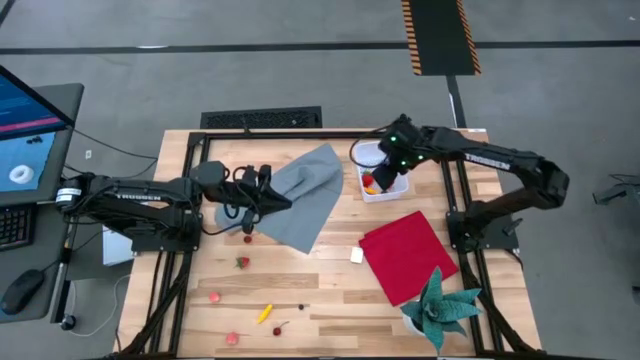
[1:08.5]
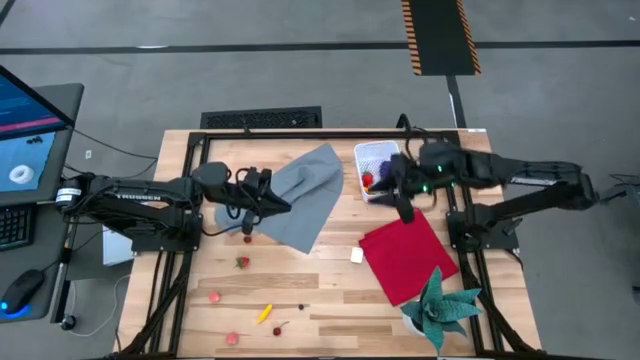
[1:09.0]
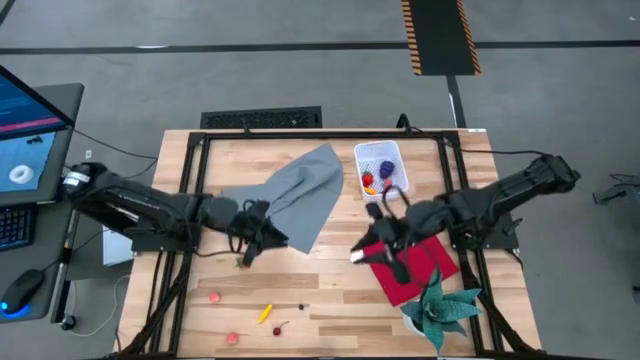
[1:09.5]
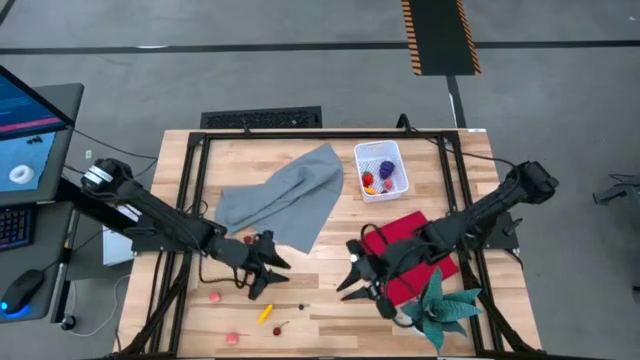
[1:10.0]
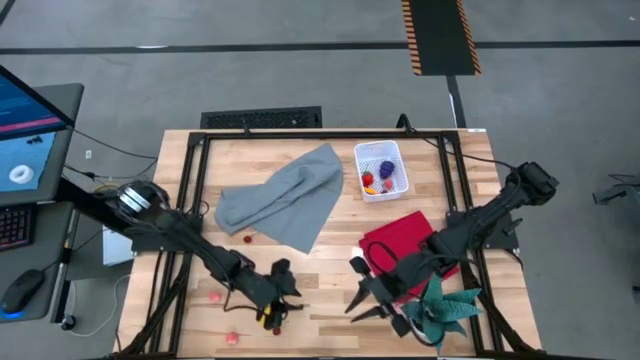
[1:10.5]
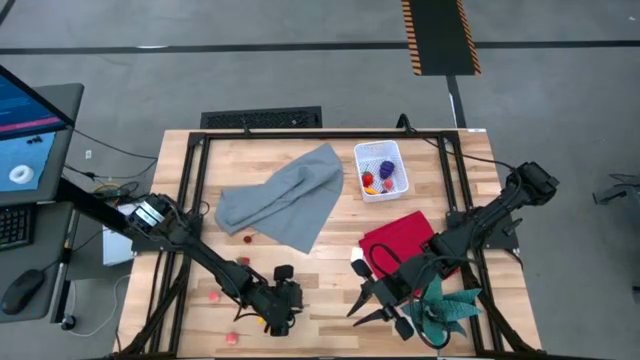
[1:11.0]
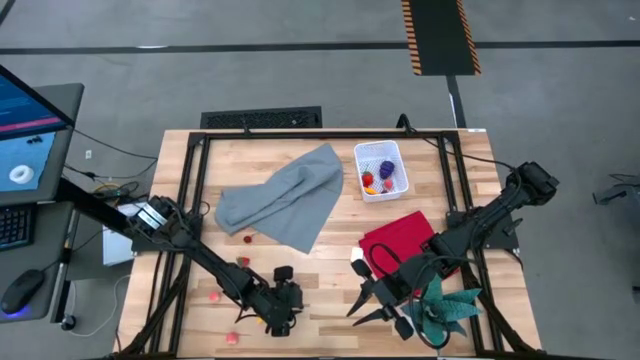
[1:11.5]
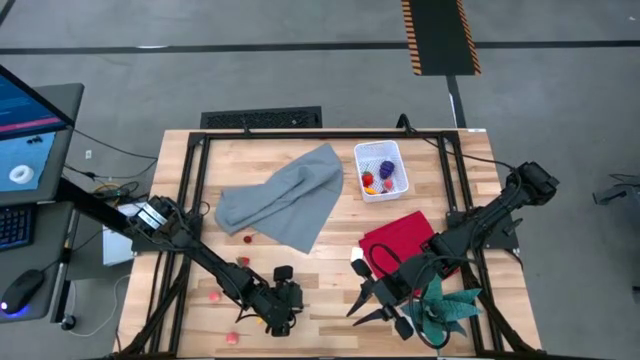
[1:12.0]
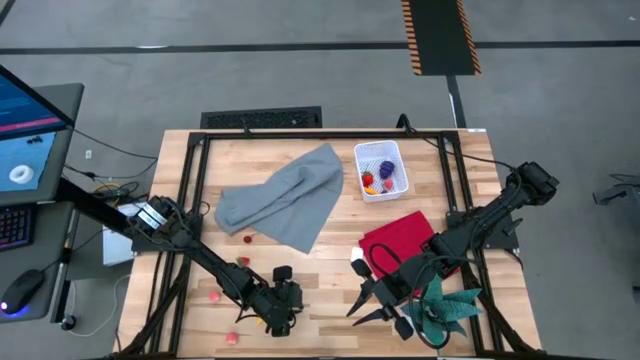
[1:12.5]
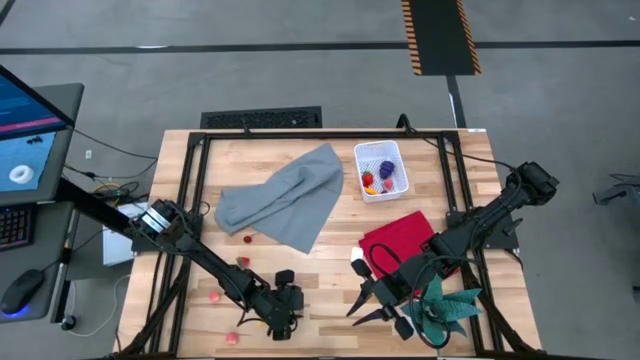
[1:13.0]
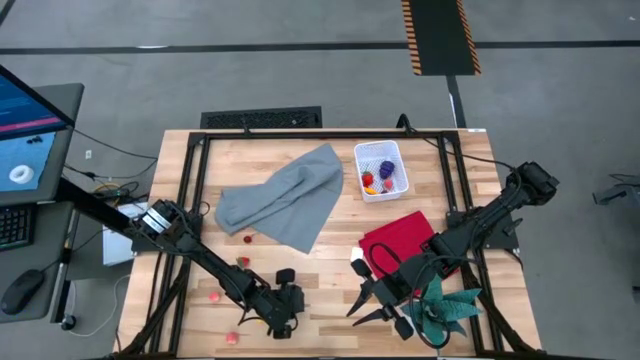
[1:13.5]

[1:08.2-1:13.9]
Task: Pick and placing Produce into tupperware
Put the blueberry into the white bin

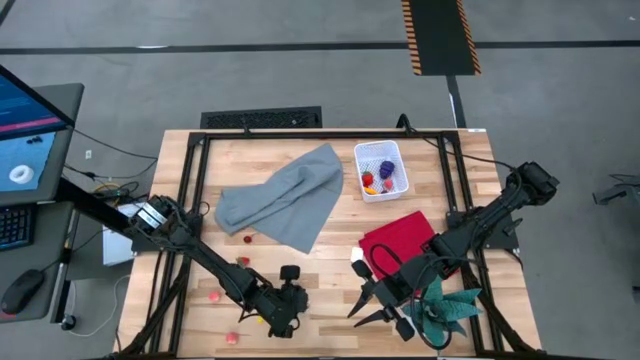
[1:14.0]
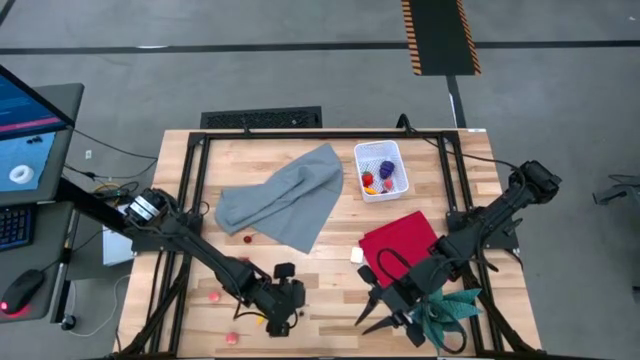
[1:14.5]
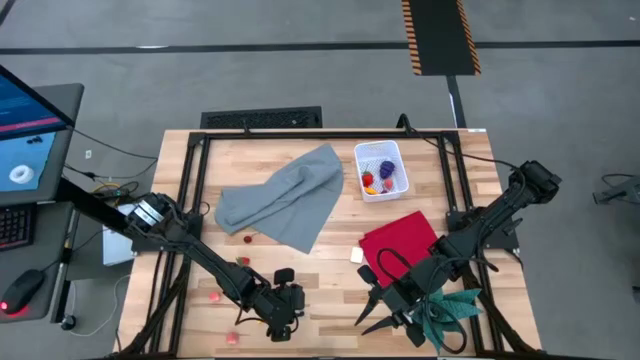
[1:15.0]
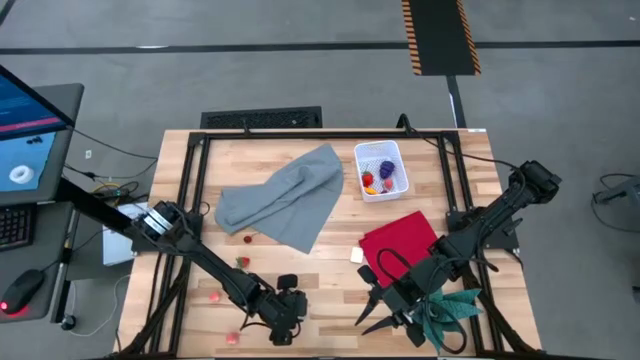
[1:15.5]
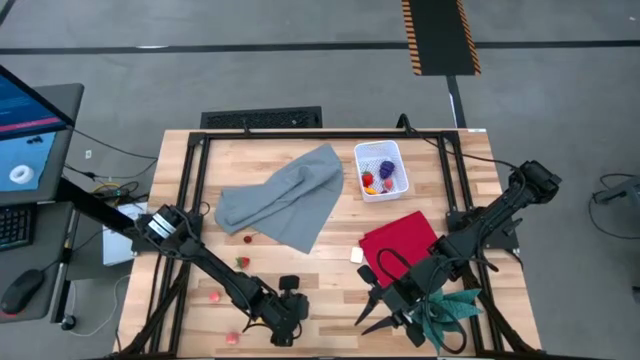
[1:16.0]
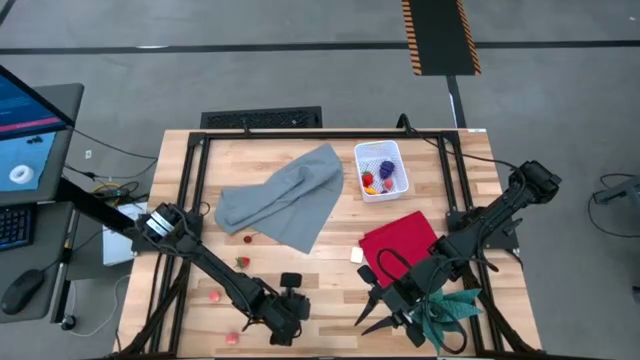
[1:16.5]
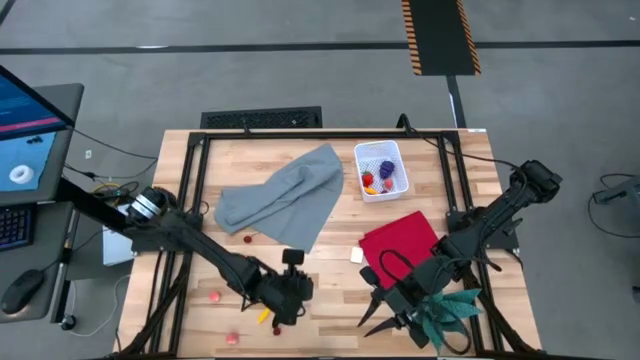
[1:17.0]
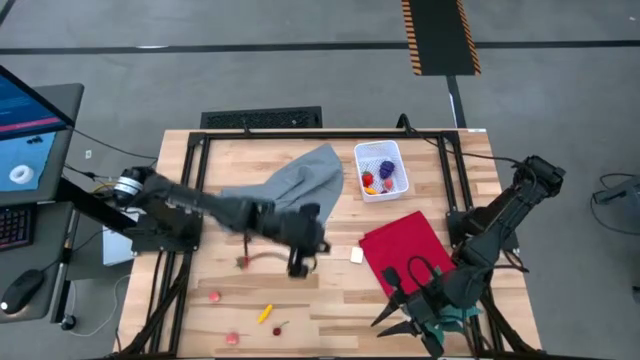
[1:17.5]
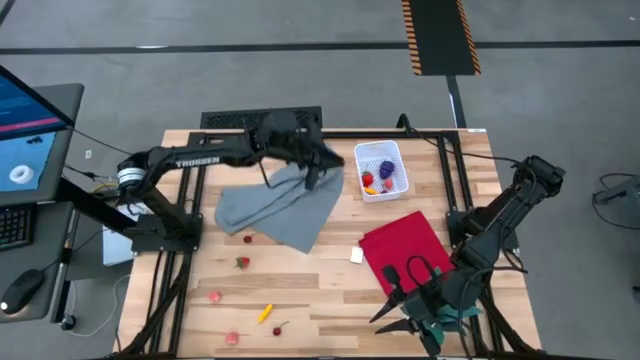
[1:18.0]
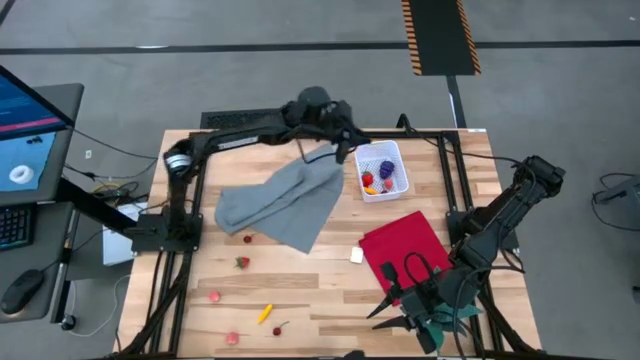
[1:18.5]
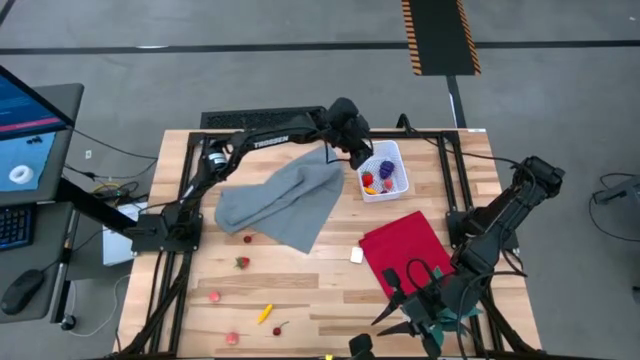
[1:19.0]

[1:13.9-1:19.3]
Put the blueberry into the white bin

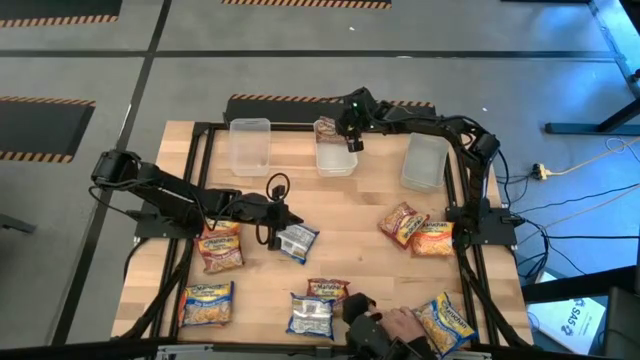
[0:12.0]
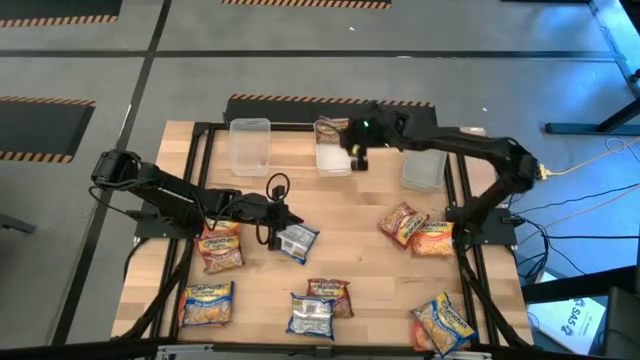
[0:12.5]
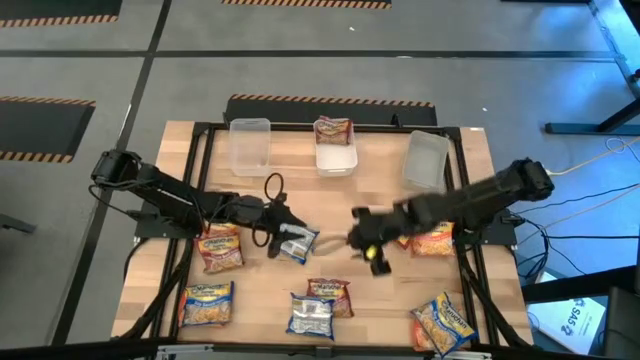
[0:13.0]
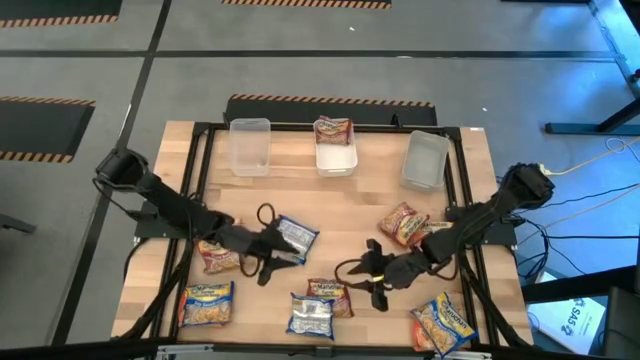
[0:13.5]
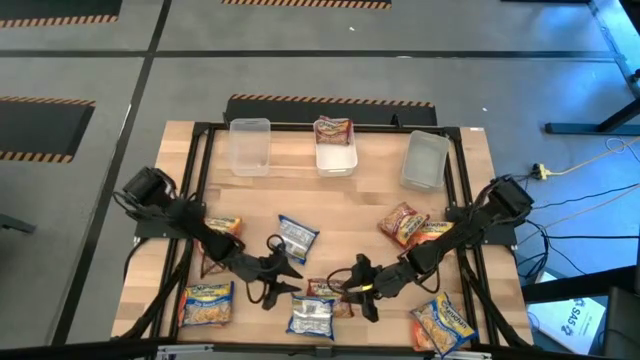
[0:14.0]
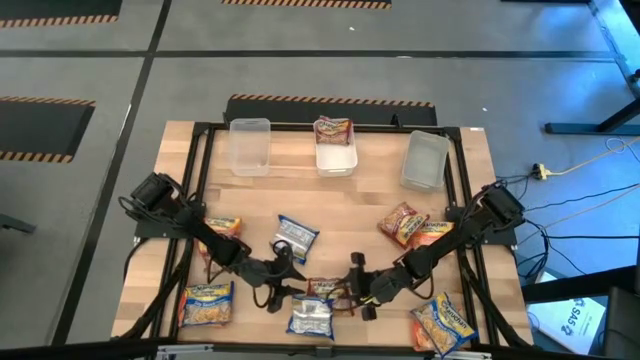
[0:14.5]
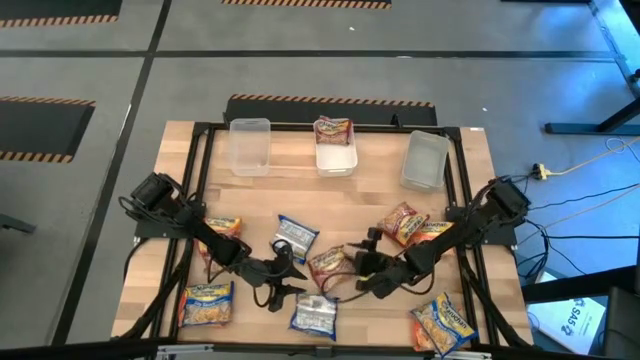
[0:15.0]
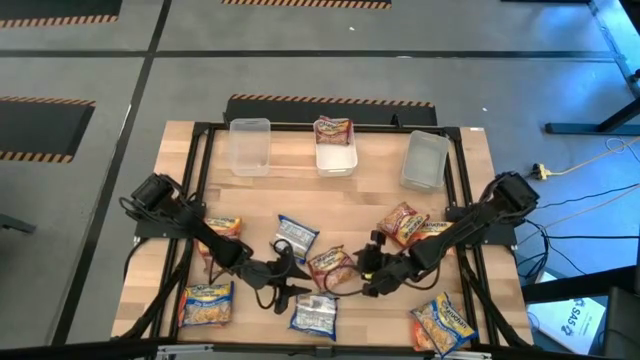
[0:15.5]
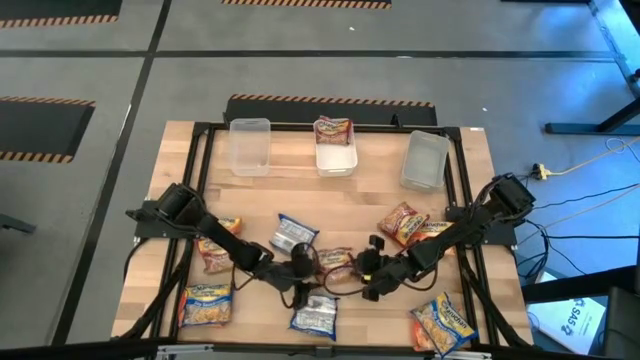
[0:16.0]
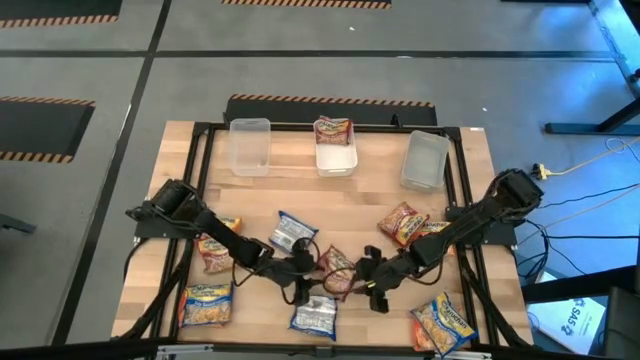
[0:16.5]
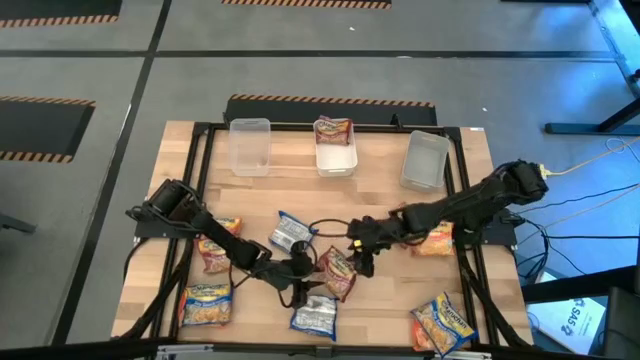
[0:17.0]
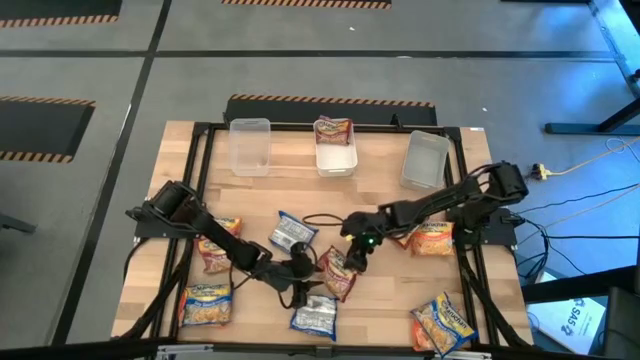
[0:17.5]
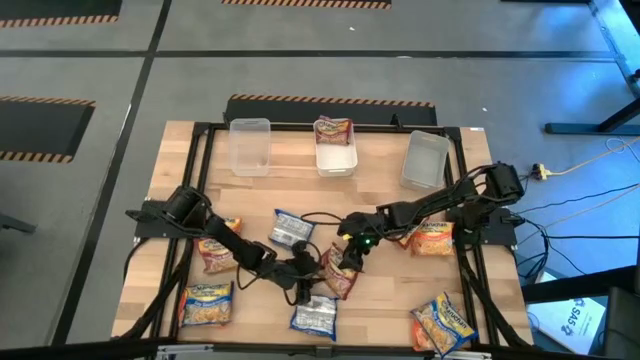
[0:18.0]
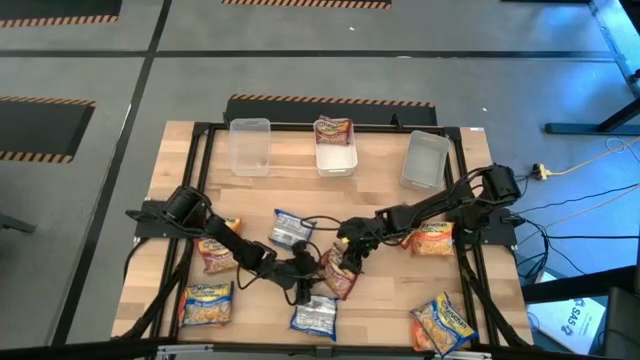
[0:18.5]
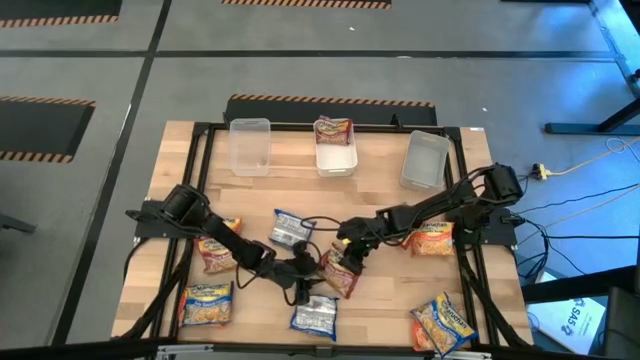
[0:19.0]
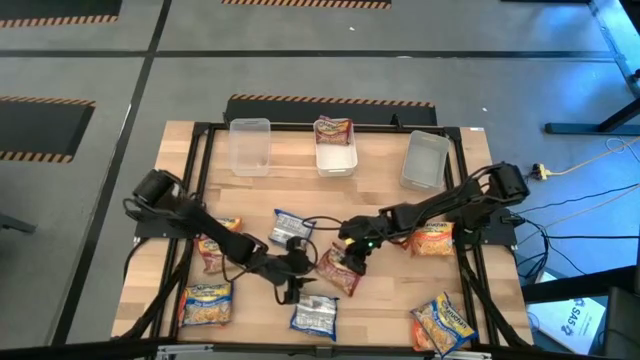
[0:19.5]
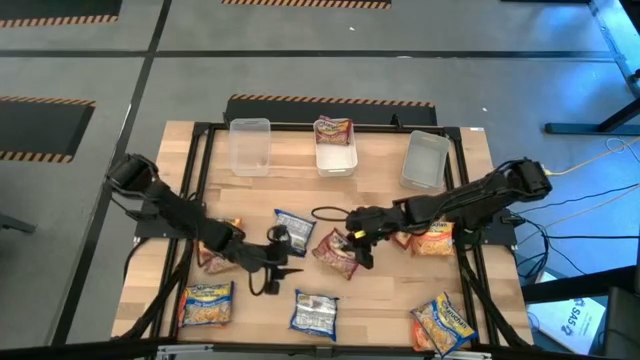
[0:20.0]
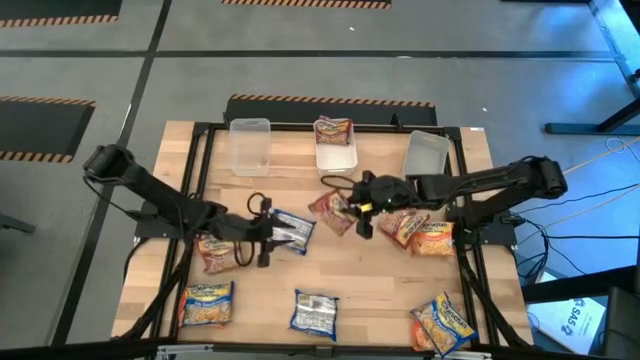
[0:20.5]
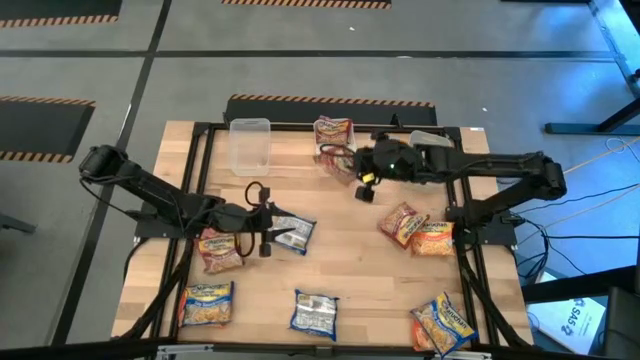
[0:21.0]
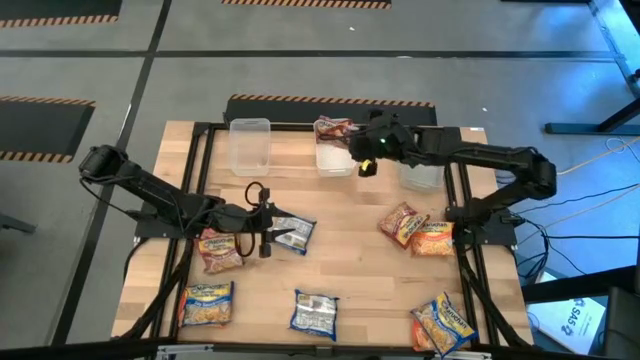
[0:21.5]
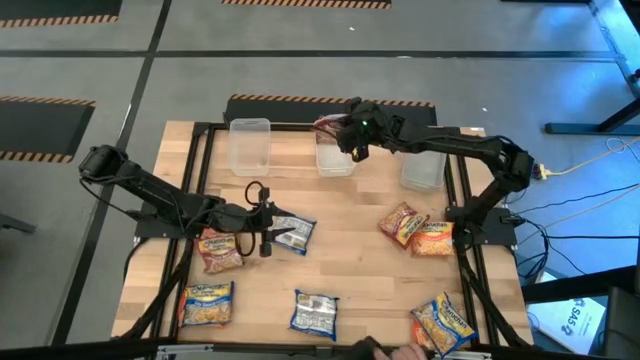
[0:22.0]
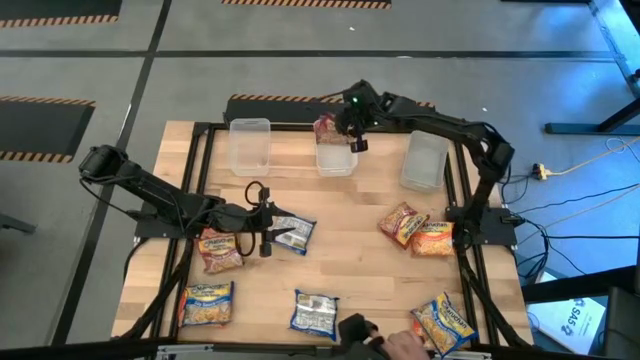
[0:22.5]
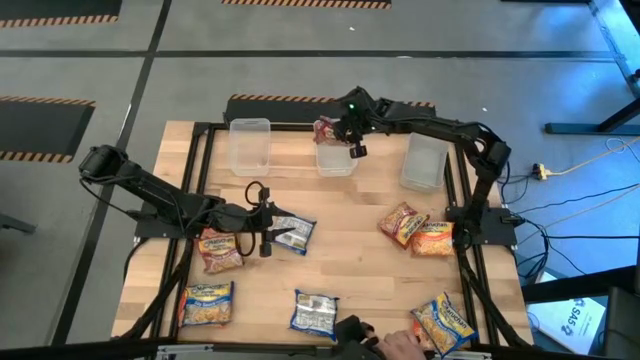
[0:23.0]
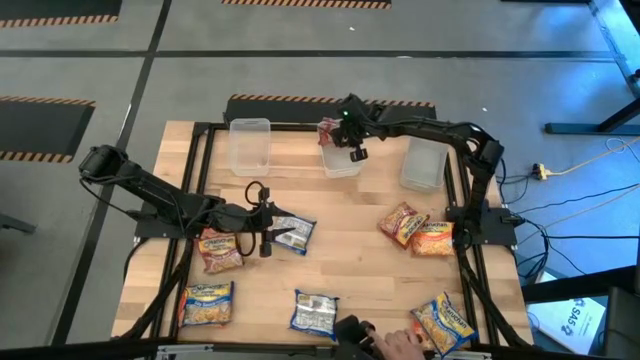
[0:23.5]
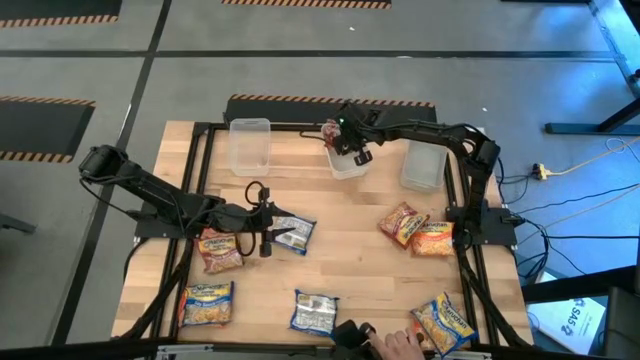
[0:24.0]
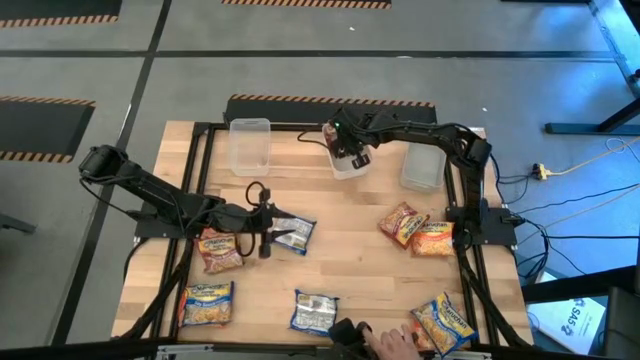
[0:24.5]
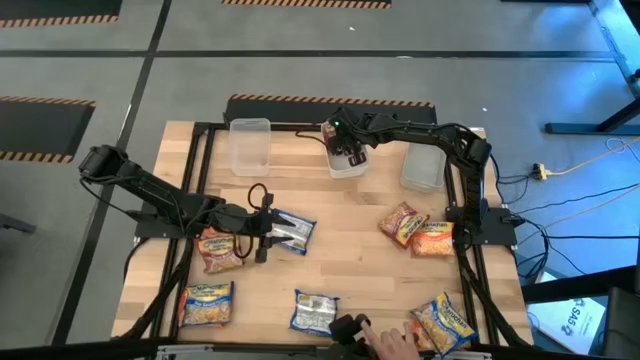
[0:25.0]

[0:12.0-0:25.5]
Task: Sort Maruchan noodles
Put the red noodle pack into the white bin
